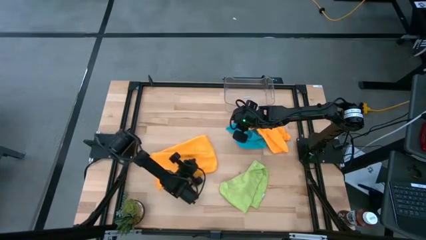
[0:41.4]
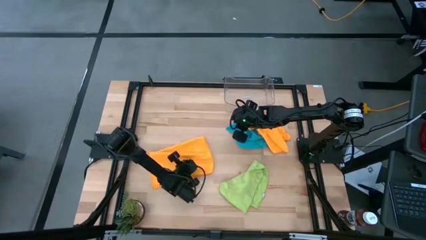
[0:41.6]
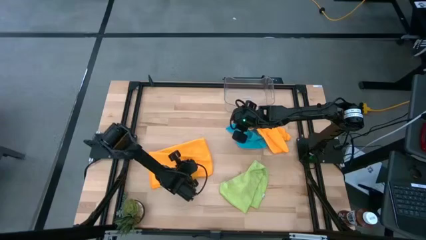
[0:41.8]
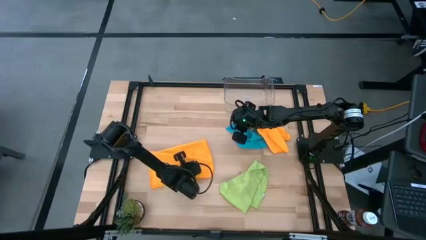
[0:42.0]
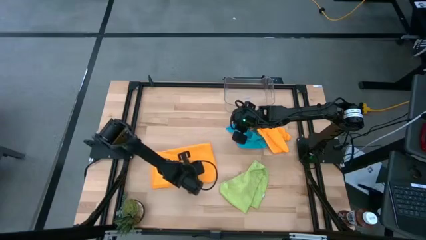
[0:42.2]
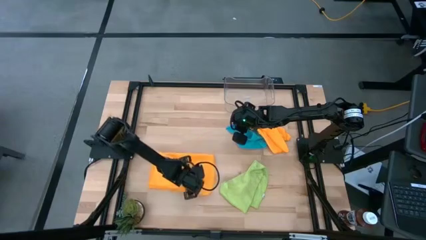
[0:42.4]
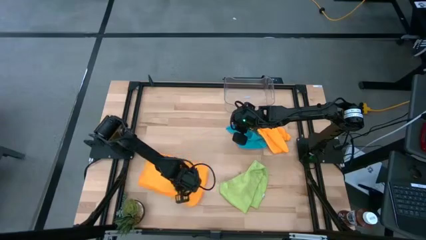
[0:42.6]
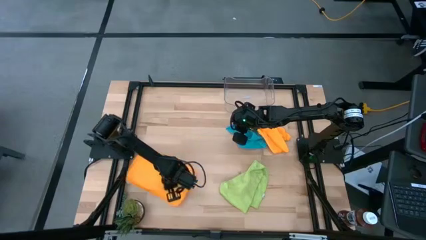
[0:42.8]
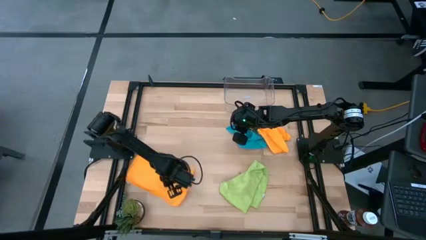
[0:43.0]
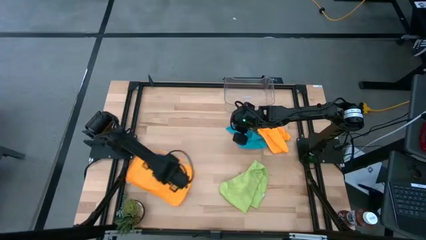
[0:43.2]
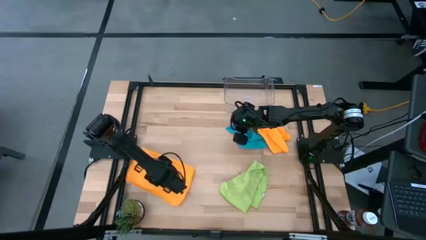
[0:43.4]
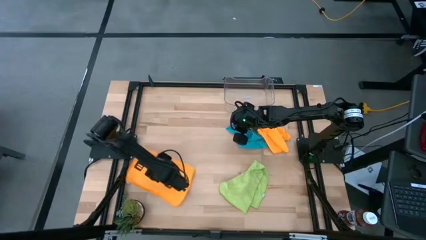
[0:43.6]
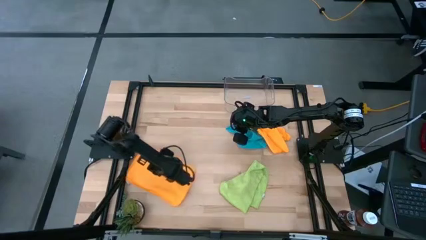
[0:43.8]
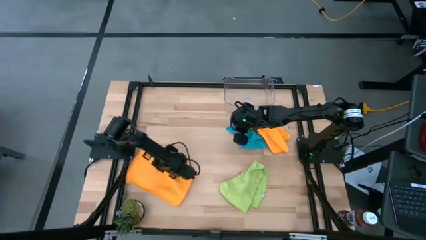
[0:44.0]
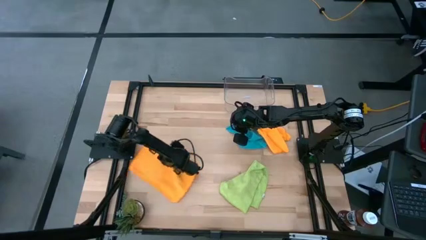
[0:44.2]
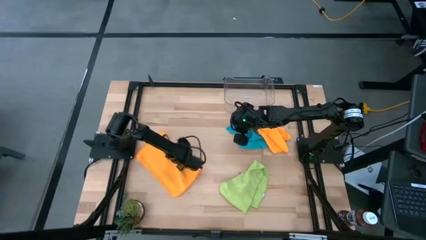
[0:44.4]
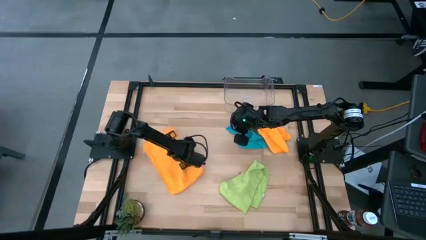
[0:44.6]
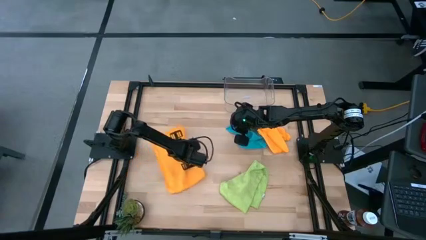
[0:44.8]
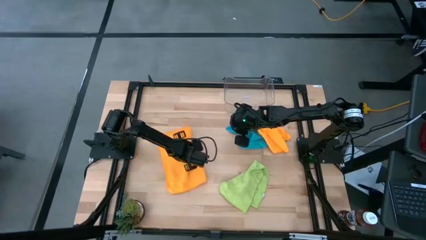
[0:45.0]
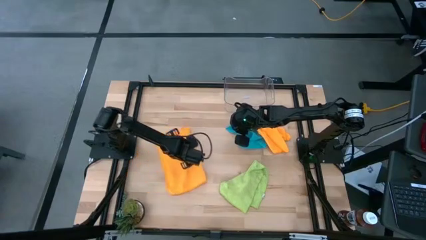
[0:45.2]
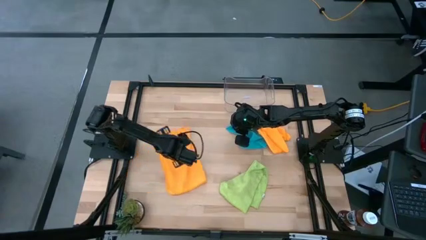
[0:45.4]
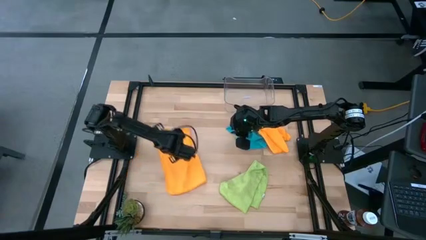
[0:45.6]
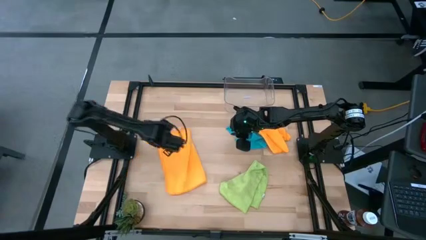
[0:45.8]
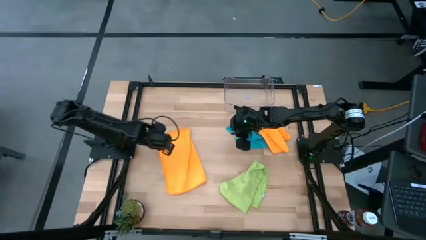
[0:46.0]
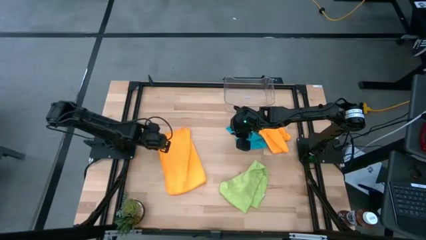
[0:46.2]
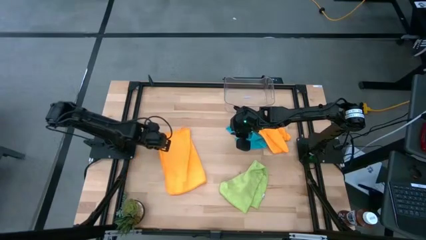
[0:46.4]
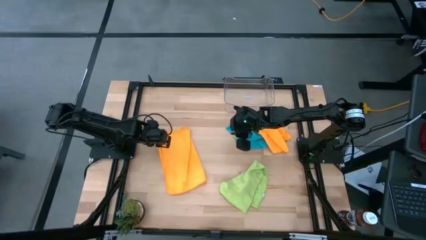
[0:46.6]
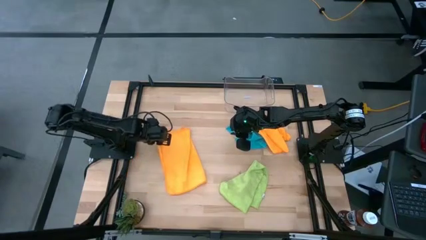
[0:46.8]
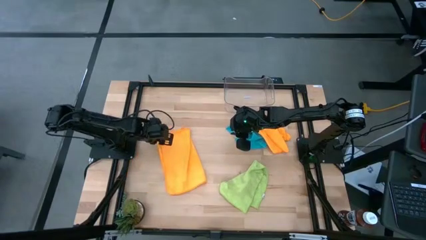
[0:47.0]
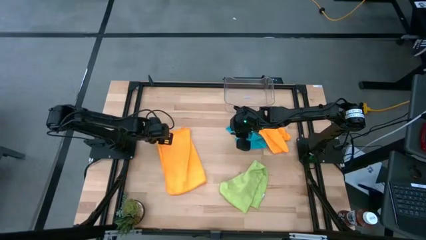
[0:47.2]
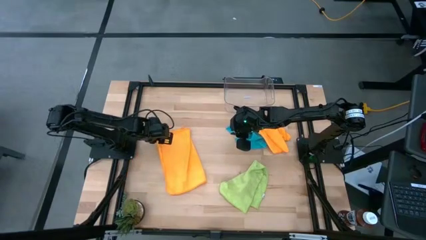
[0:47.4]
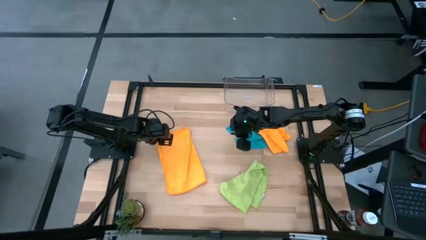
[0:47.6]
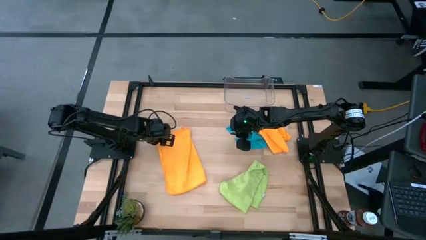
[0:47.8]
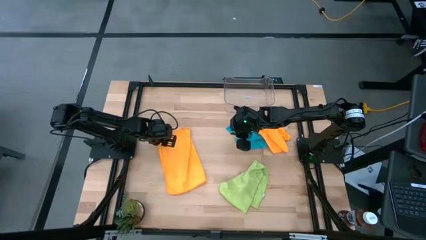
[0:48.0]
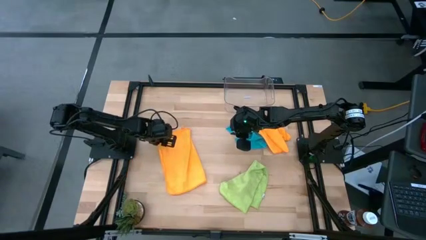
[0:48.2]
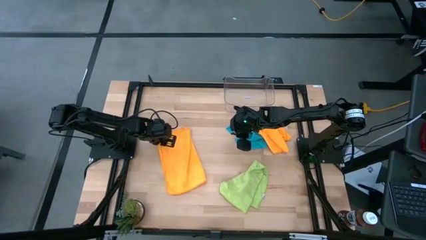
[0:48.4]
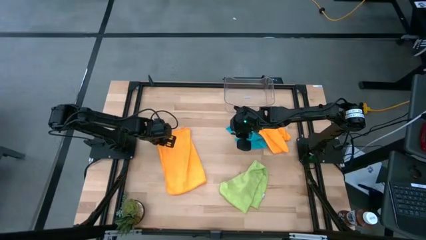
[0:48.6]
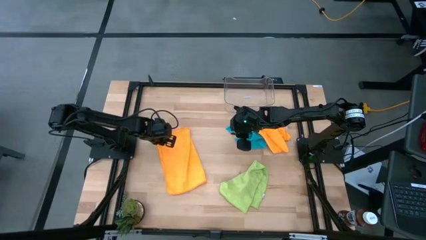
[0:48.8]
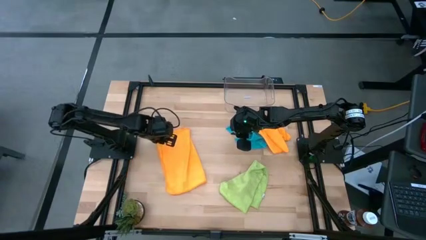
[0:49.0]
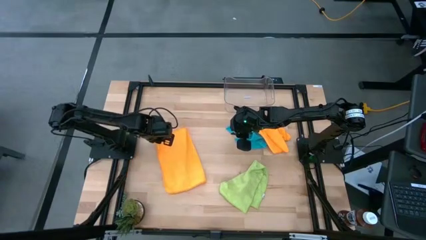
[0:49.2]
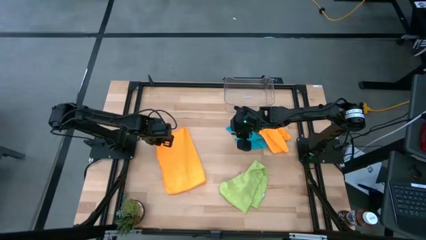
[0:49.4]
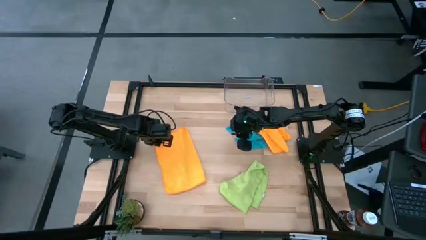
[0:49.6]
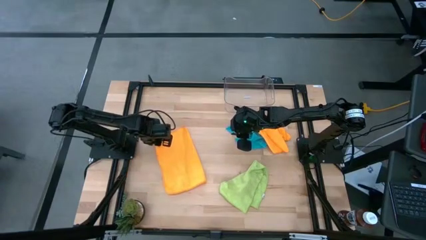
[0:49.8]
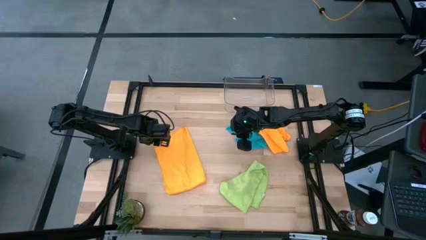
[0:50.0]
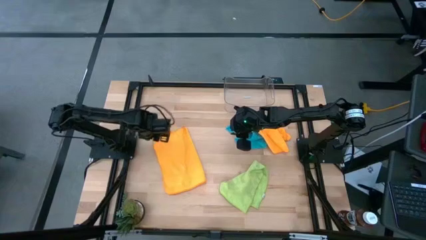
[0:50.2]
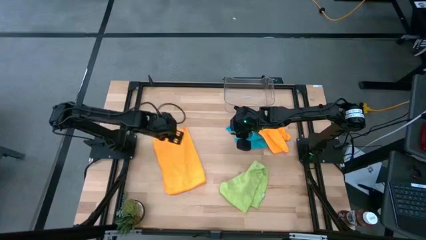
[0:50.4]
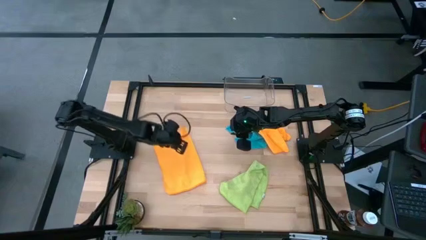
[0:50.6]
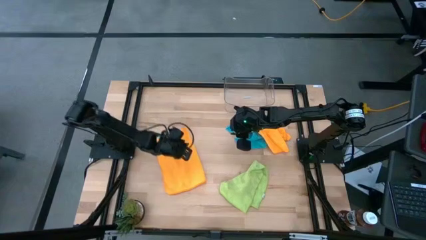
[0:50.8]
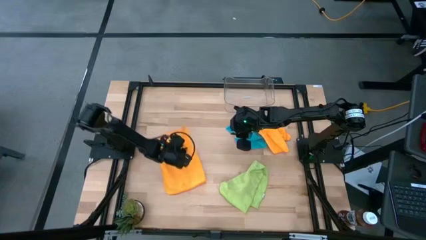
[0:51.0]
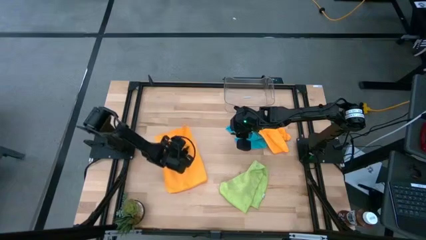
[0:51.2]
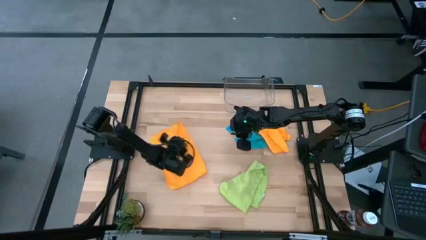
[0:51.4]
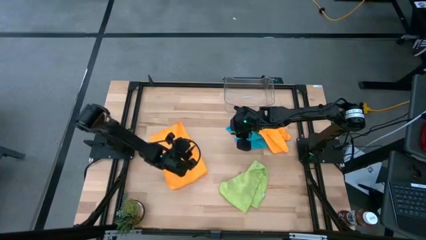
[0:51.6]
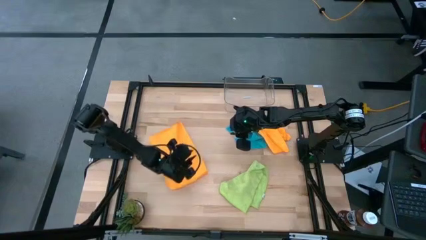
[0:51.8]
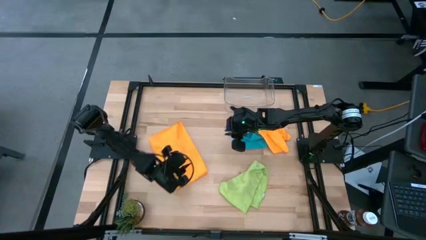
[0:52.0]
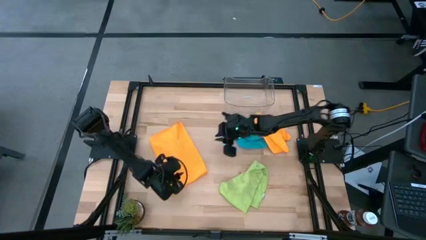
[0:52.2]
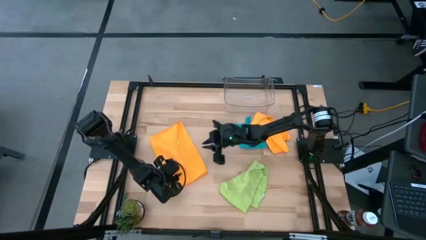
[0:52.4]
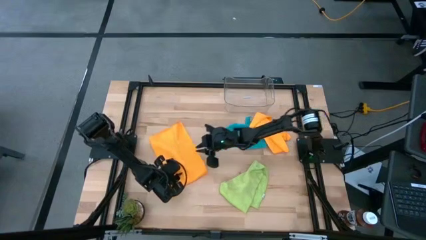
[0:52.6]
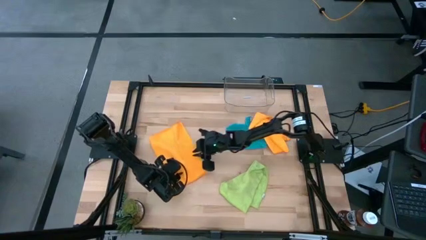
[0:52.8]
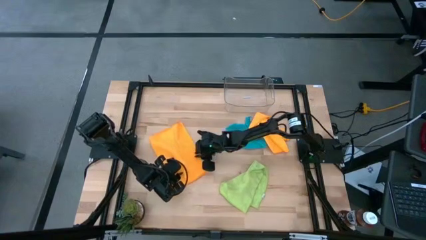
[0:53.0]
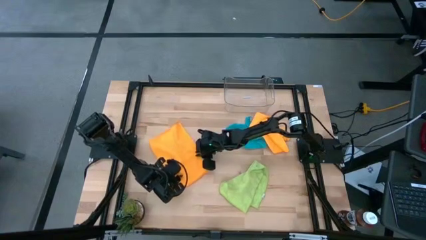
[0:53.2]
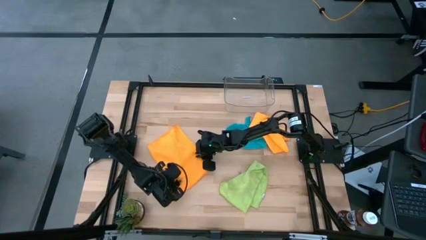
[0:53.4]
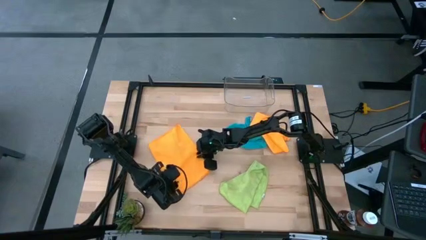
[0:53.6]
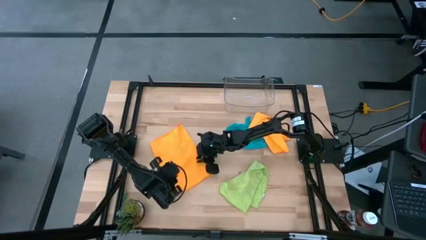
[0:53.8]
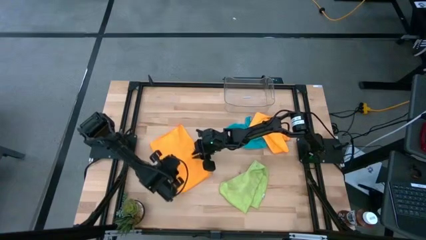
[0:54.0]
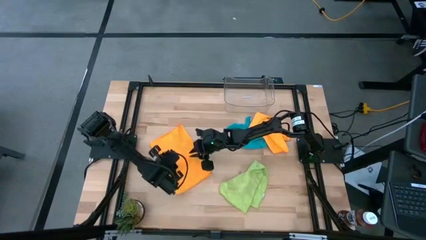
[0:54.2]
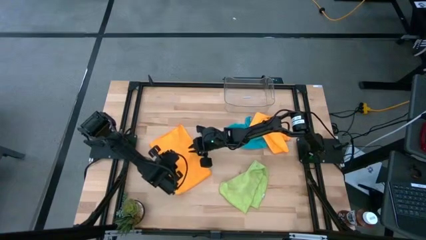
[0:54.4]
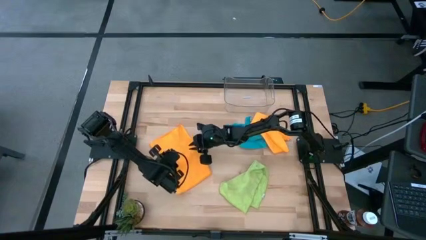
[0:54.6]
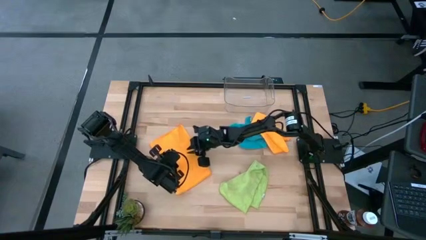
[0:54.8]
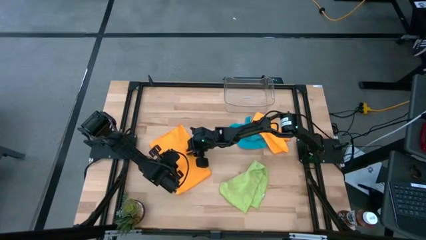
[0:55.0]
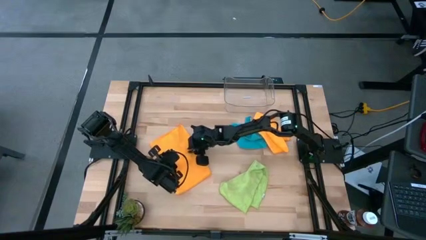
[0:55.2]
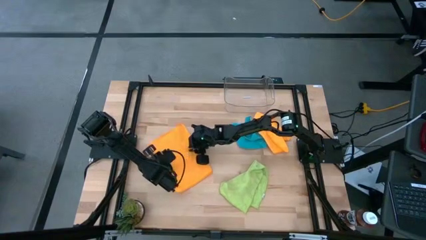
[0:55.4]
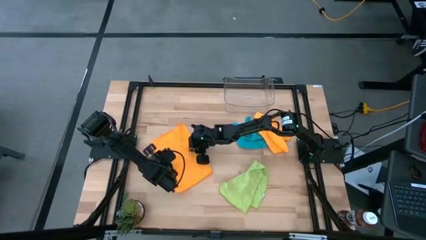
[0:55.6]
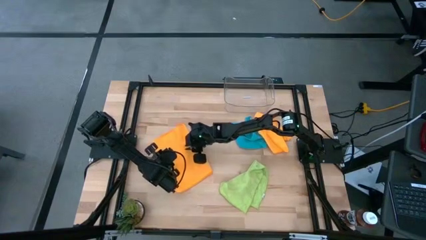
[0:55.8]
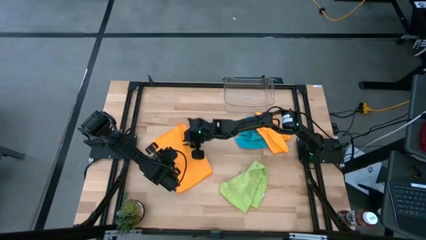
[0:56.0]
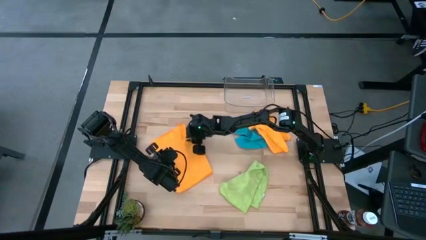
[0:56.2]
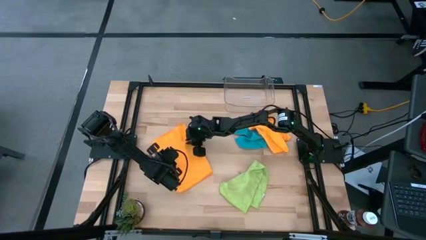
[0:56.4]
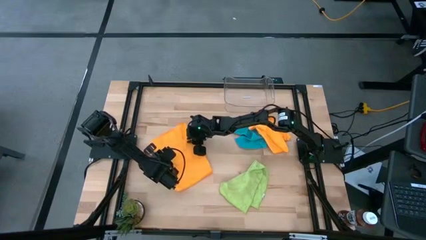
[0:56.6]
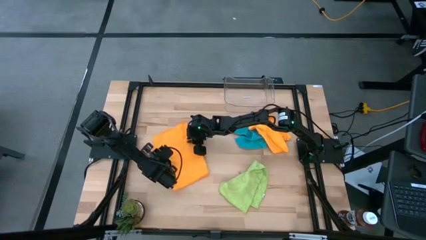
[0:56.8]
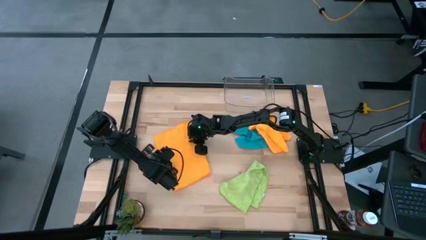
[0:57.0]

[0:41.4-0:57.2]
Task: Fold microfiber towels
Fold the left yellow microfiber cloth
